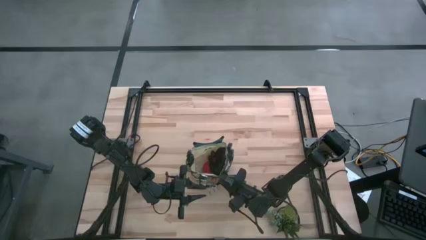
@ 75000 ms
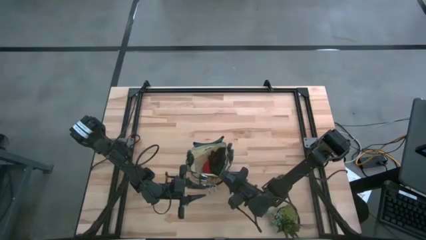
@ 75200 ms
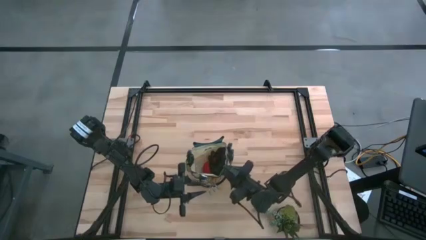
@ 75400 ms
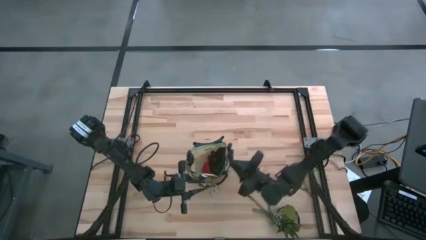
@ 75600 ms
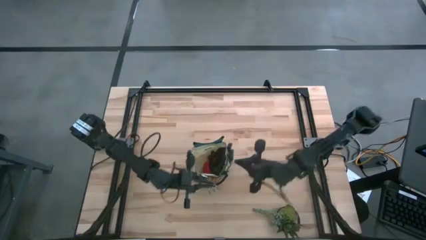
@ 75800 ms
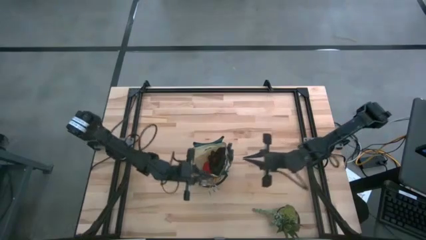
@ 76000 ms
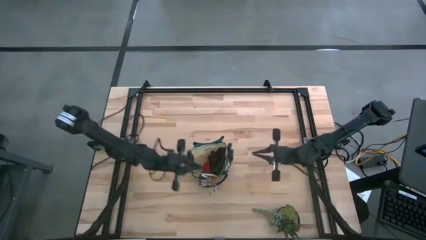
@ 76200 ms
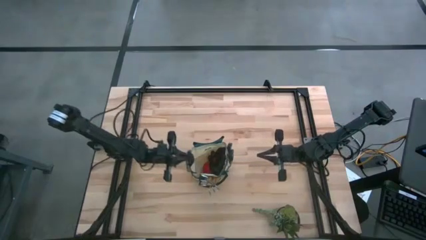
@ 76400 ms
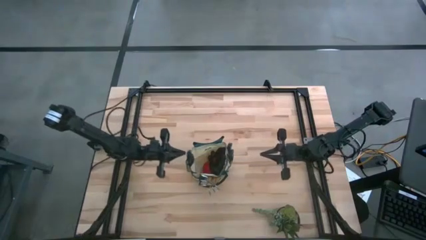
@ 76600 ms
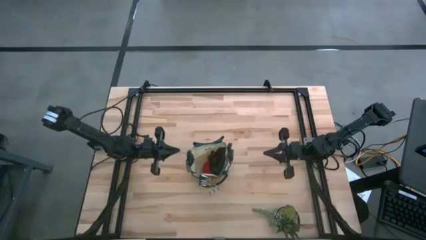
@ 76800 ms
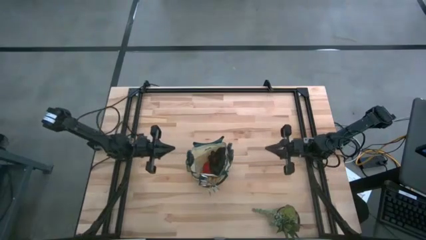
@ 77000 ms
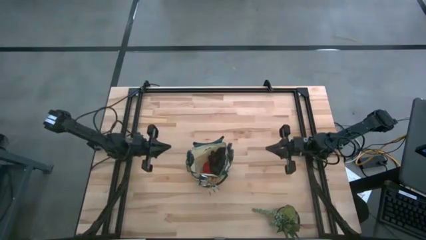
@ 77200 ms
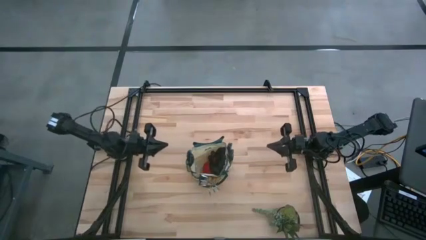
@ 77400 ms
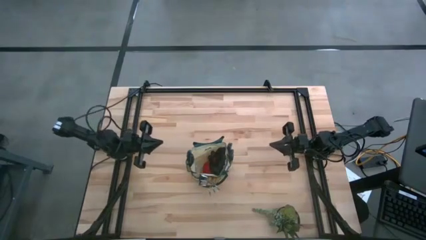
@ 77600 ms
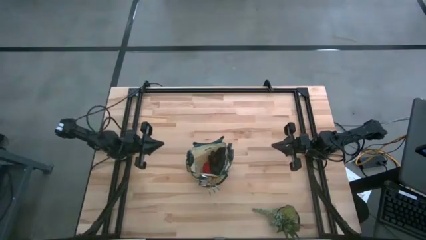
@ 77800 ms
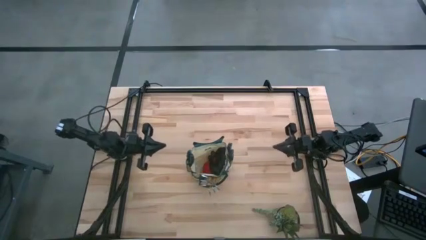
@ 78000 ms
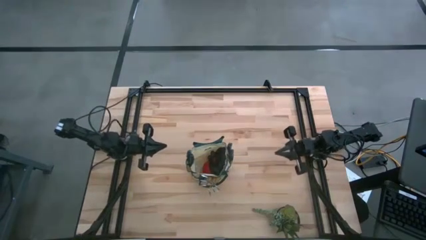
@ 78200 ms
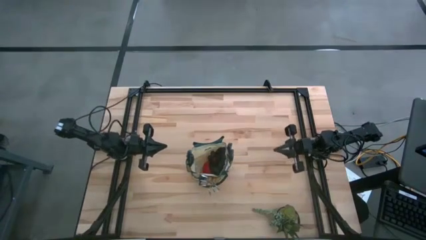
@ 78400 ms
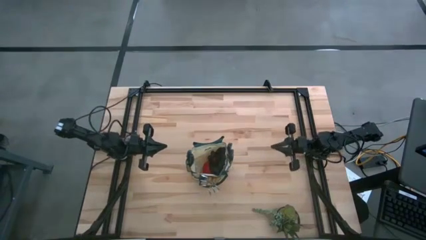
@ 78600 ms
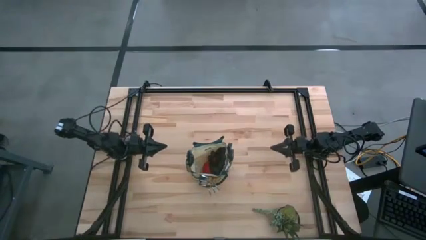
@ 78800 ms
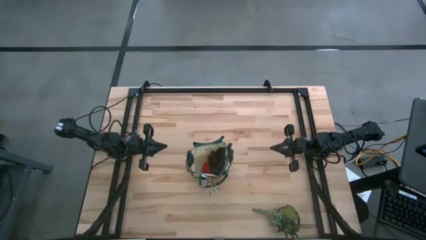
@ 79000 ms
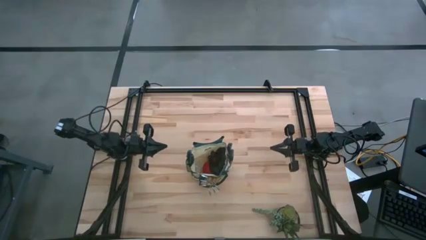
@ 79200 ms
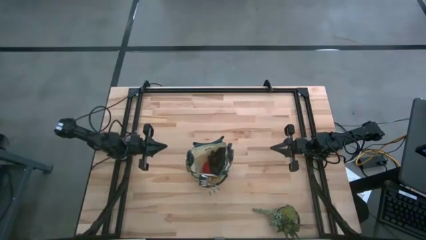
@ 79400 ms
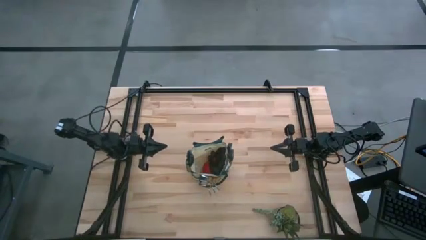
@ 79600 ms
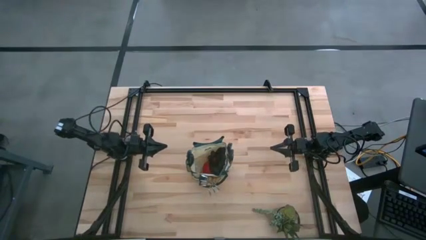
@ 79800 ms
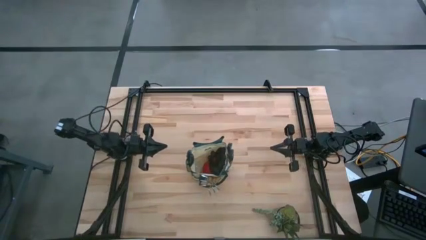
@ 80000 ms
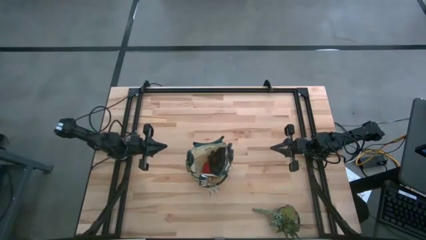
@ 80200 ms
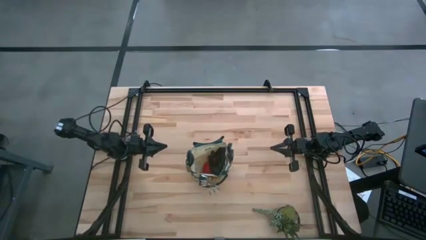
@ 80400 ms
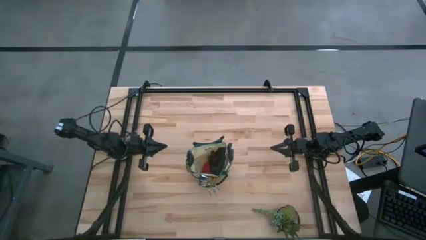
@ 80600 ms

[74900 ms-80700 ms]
Task: Pick & Place Garden tools in Gardening bag
Return to Home Position

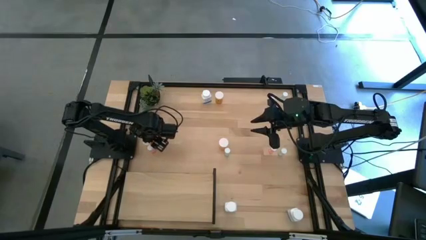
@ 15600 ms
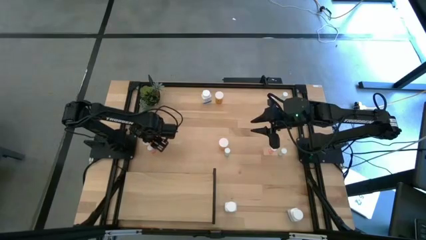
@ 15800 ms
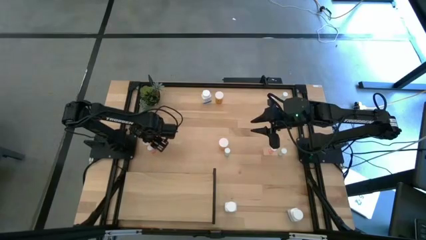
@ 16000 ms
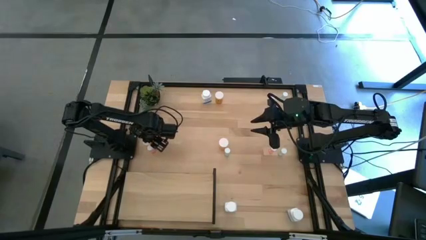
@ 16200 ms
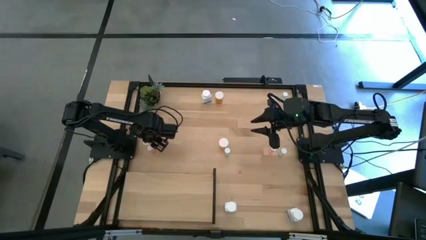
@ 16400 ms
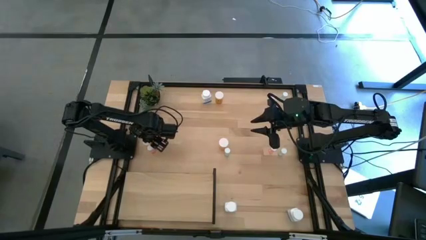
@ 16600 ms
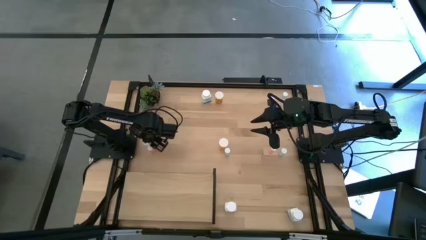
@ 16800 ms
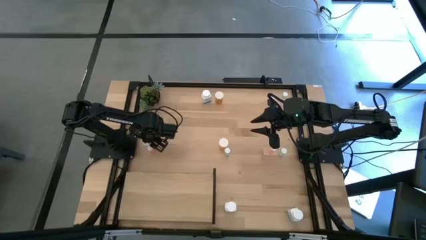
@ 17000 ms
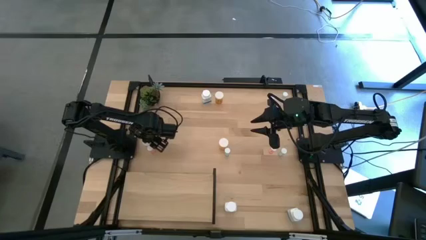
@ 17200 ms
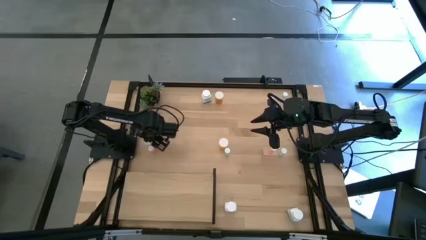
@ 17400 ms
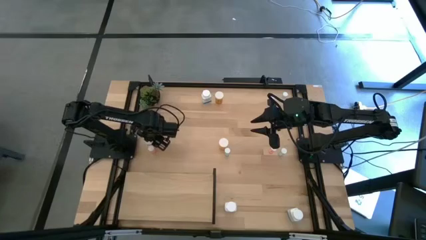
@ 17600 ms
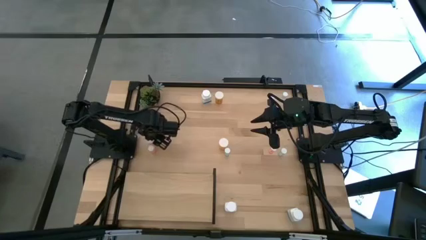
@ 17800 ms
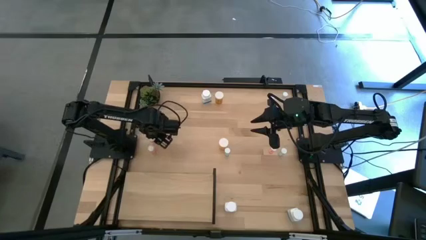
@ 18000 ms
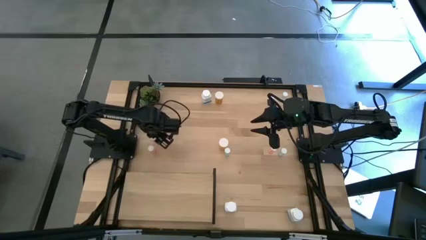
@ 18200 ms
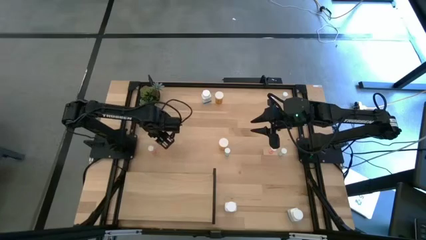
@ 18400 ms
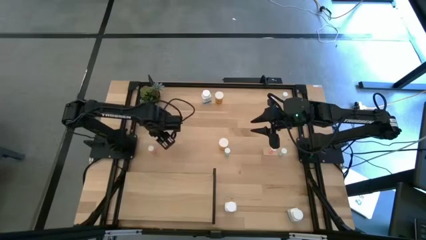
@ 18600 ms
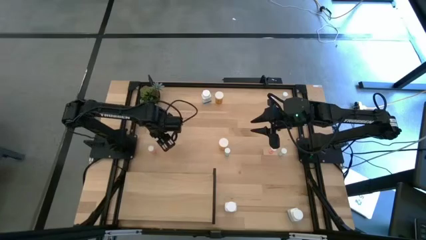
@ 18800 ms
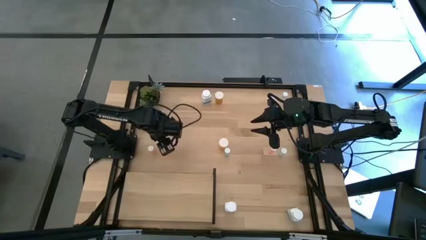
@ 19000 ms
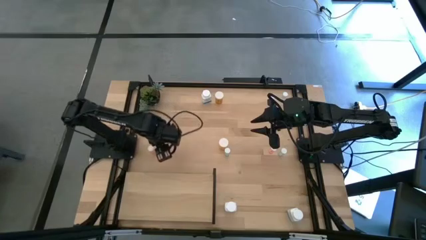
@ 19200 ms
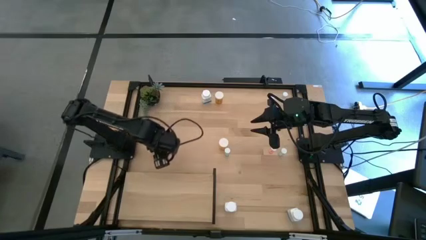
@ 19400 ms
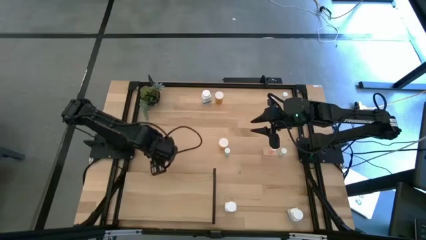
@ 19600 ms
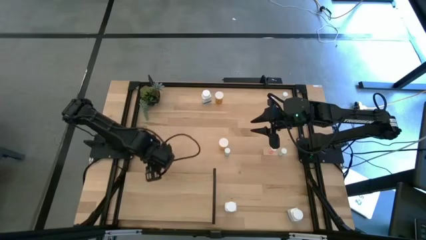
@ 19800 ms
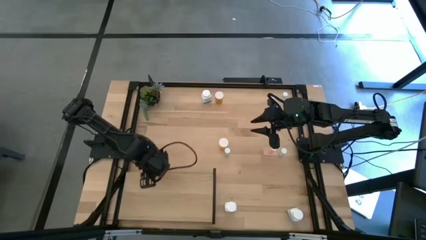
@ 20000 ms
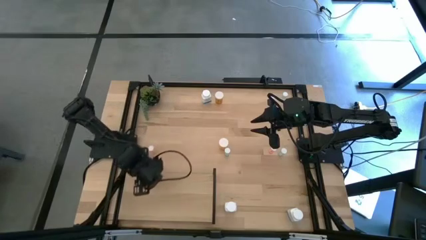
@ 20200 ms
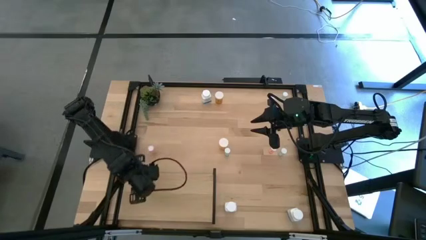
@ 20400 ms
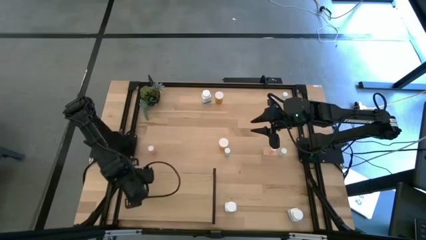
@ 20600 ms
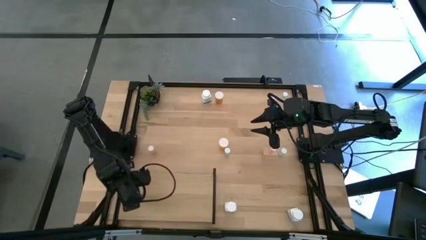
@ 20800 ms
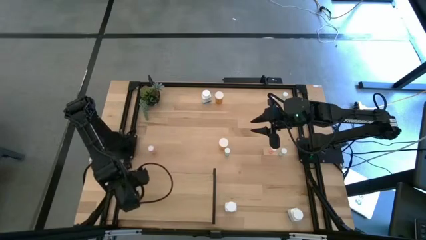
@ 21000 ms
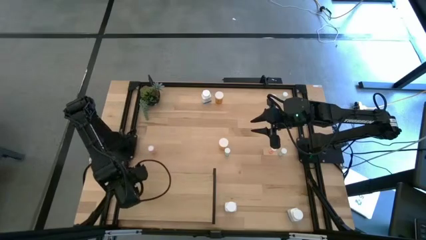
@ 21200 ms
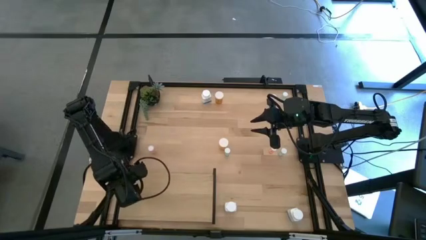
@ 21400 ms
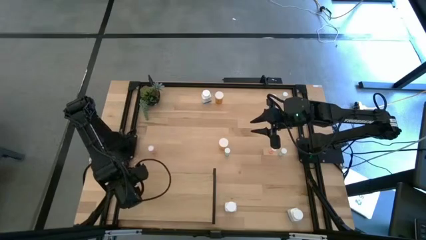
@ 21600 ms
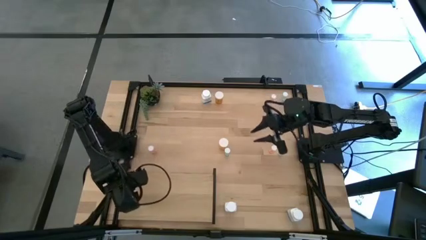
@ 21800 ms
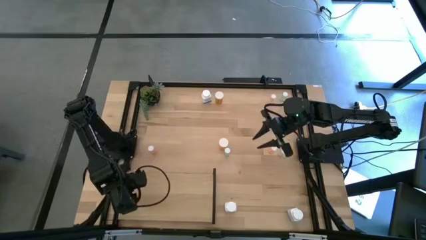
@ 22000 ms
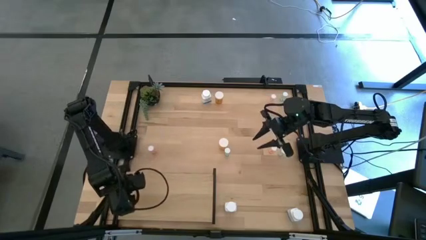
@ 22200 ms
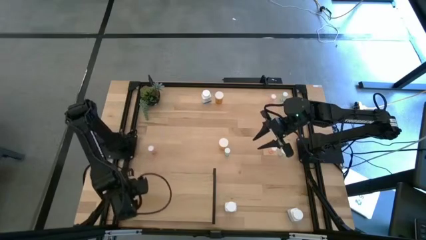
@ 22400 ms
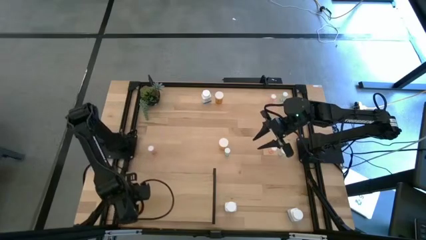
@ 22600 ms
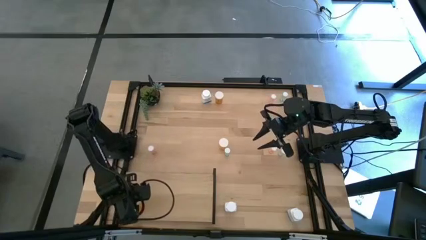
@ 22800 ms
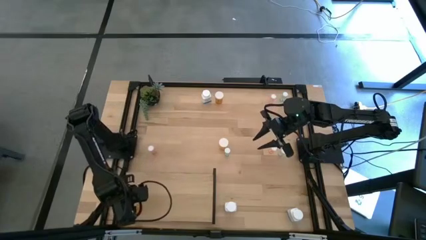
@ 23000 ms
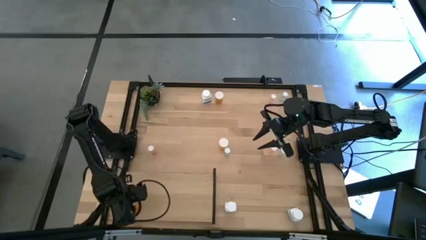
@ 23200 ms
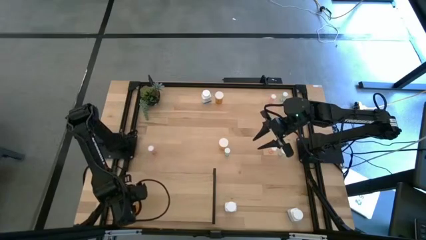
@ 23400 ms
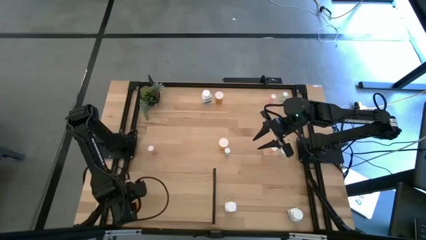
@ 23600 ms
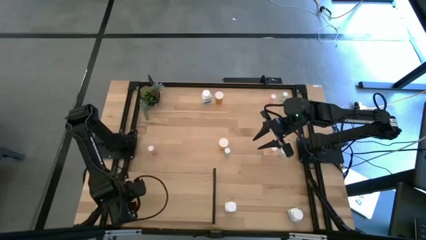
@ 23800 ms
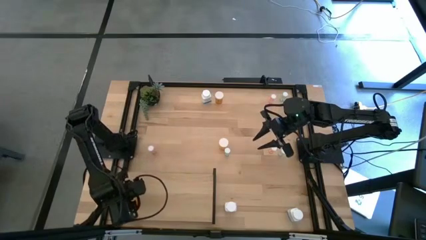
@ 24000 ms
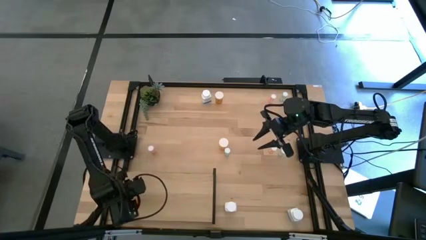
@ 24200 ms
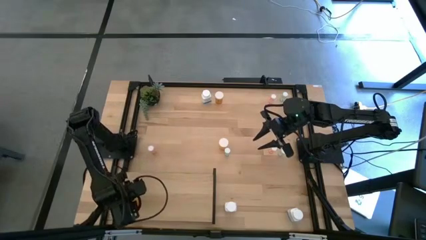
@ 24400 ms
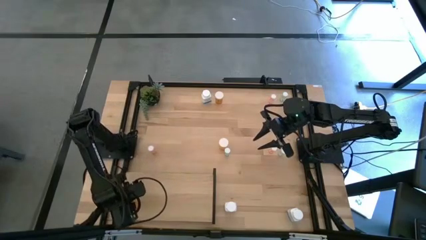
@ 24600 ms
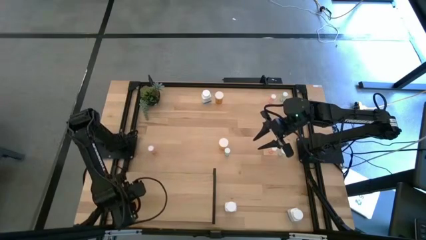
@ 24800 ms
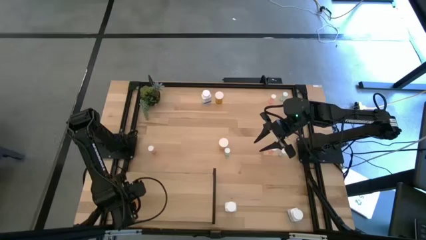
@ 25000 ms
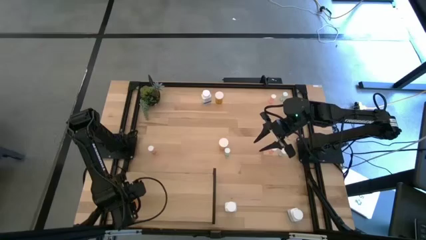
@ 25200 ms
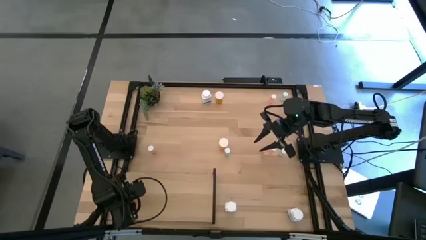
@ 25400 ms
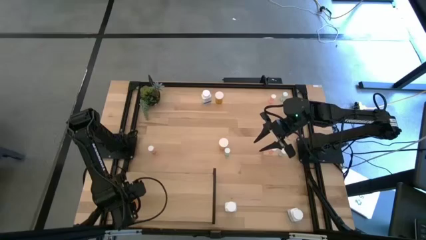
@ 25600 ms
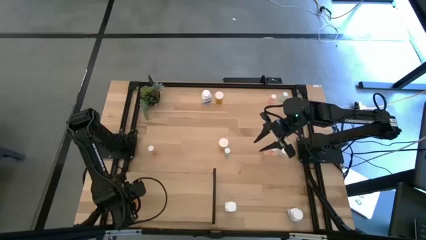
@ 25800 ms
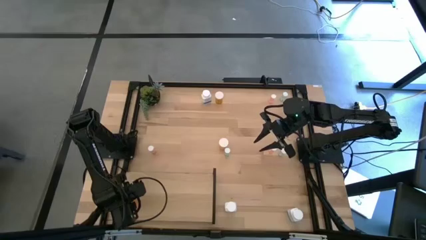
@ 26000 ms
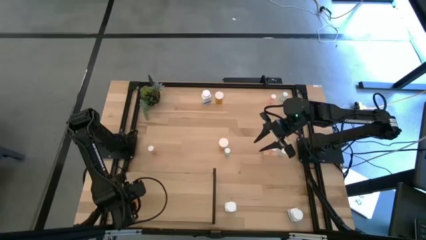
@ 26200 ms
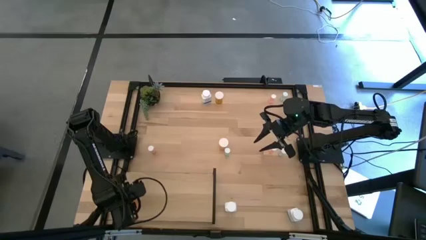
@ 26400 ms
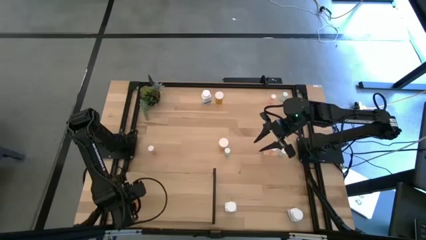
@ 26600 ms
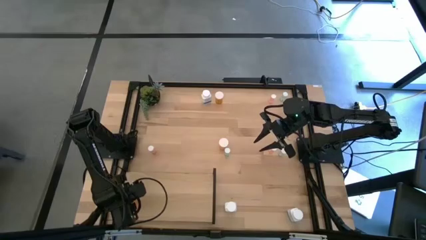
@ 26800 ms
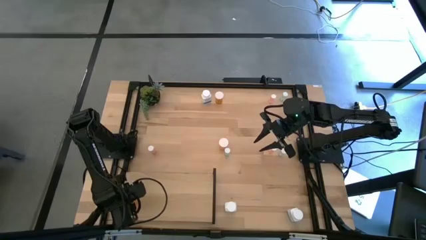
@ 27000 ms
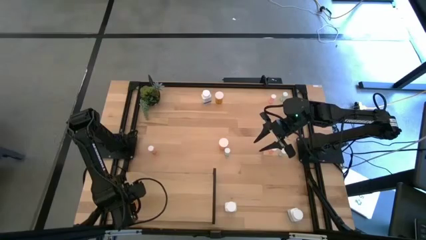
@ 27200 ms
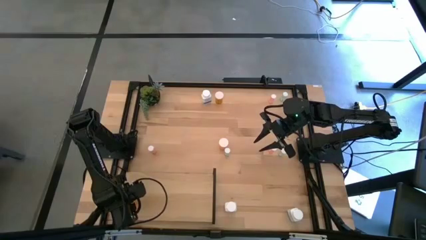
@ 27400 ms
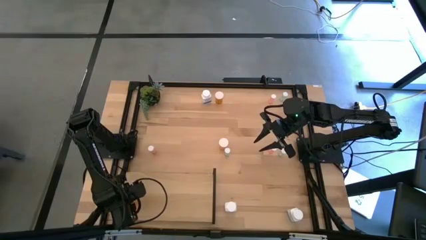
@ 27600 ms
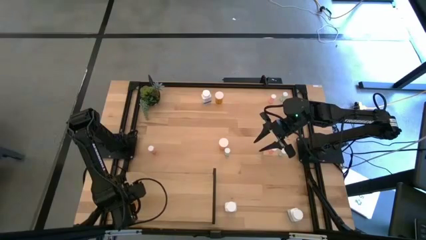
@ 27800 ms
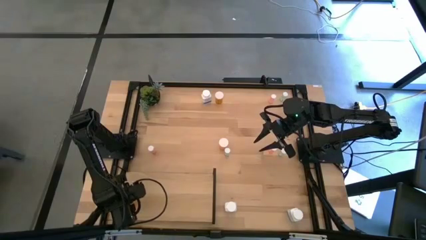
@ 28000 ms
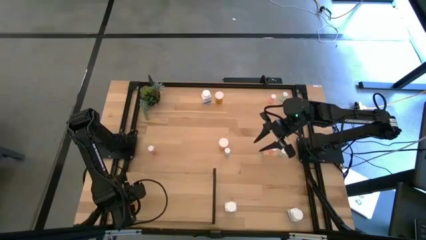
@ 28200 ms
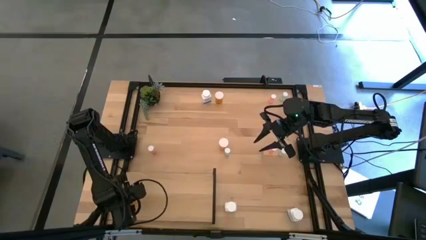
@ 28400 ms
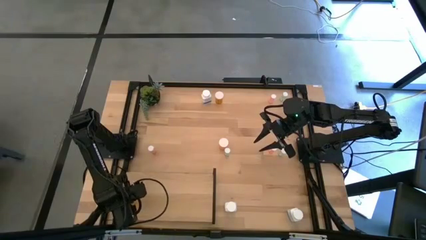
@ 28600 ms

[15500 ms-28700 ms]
Task: Pick and place medicine bottles onto shelf by color
Put the bottom left big orange pill bottle on the shelf
